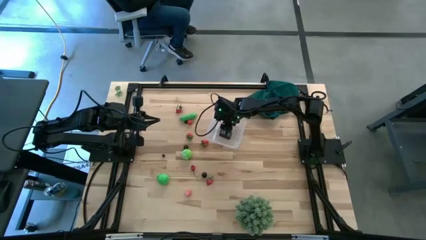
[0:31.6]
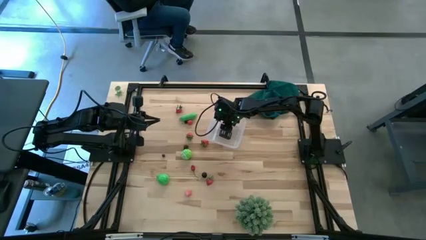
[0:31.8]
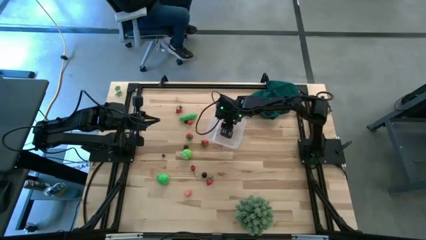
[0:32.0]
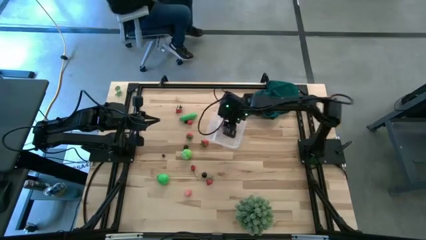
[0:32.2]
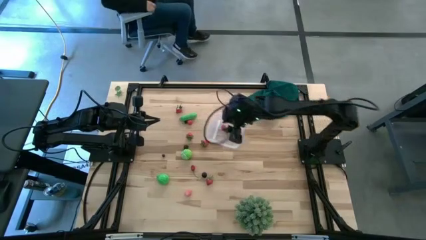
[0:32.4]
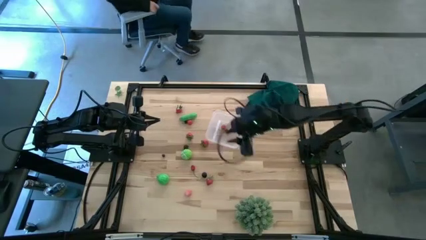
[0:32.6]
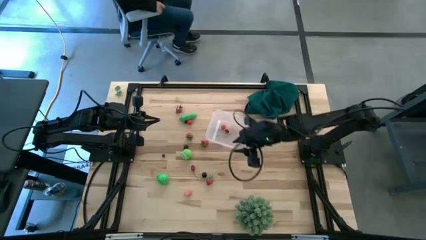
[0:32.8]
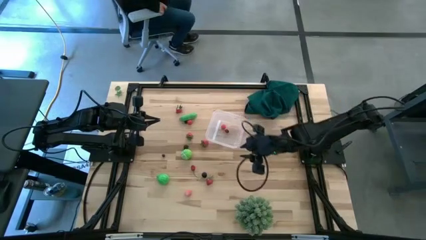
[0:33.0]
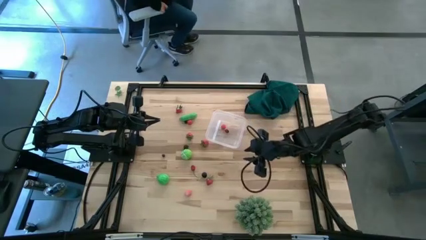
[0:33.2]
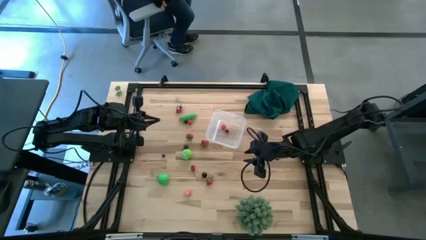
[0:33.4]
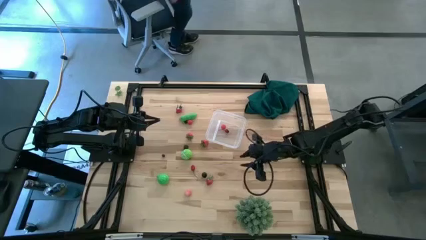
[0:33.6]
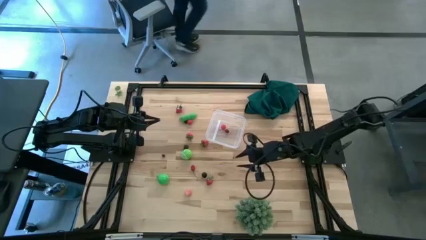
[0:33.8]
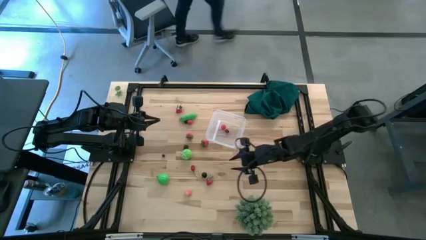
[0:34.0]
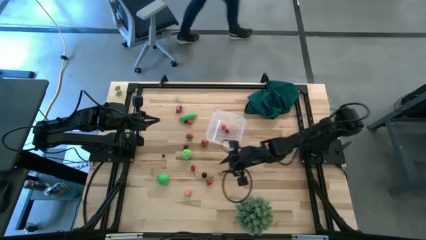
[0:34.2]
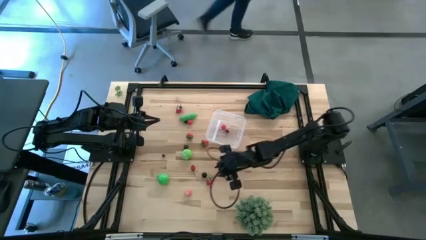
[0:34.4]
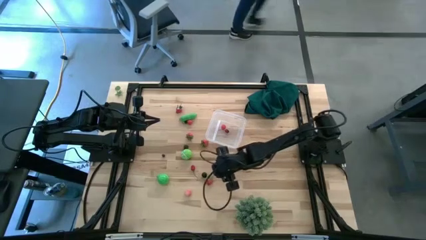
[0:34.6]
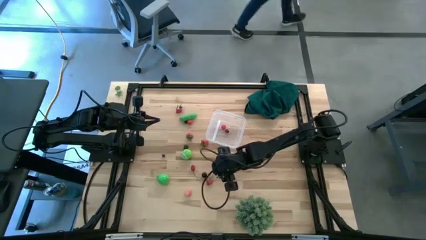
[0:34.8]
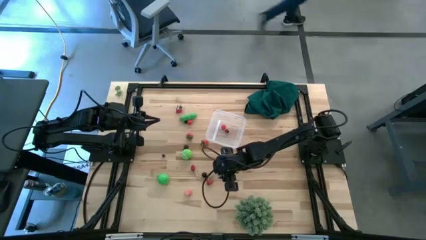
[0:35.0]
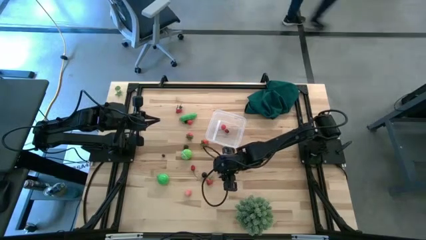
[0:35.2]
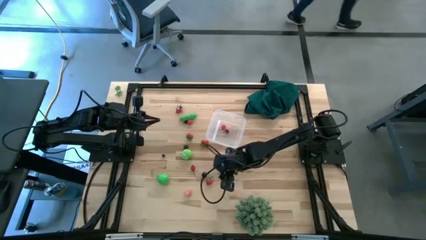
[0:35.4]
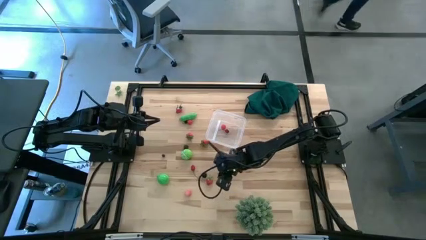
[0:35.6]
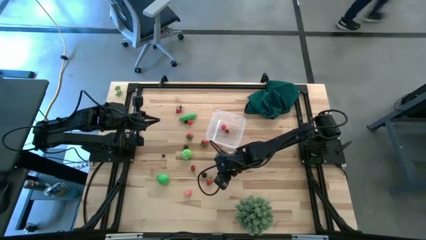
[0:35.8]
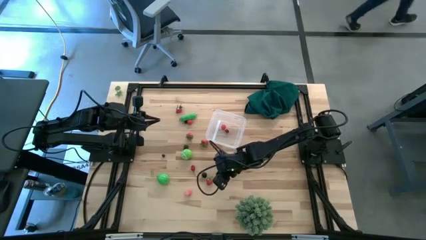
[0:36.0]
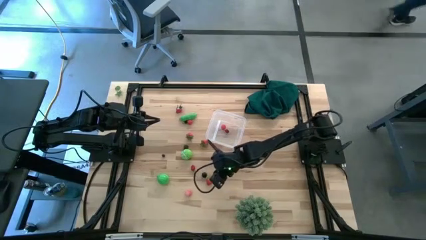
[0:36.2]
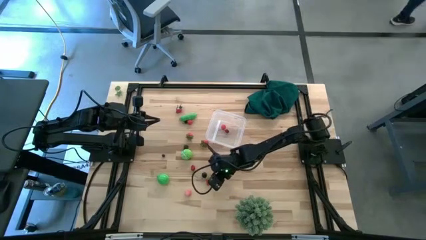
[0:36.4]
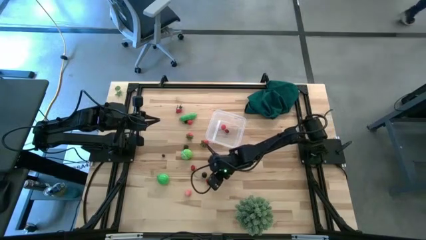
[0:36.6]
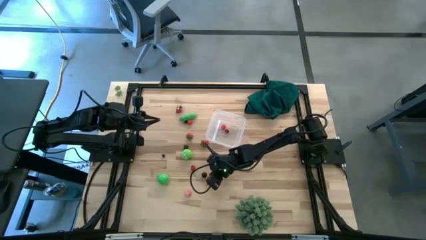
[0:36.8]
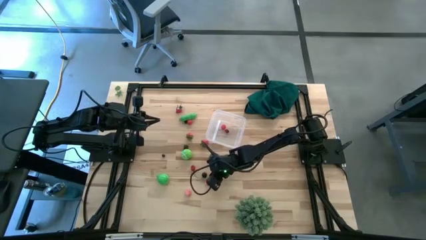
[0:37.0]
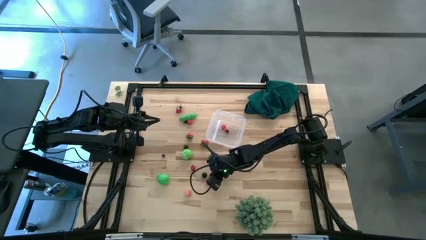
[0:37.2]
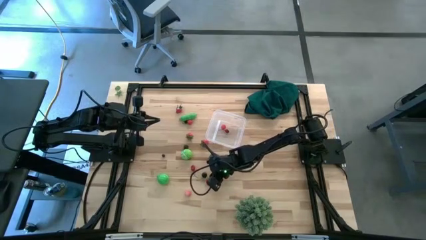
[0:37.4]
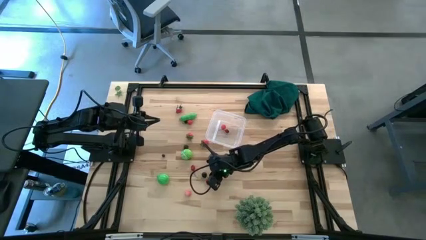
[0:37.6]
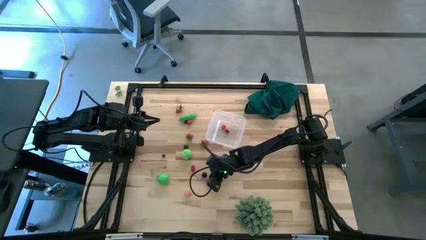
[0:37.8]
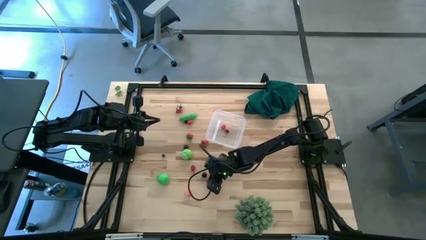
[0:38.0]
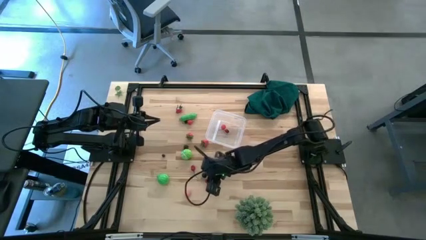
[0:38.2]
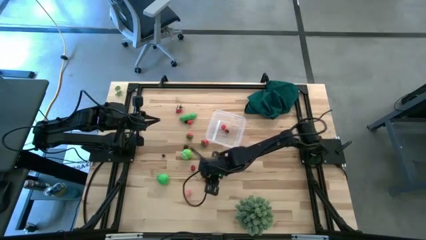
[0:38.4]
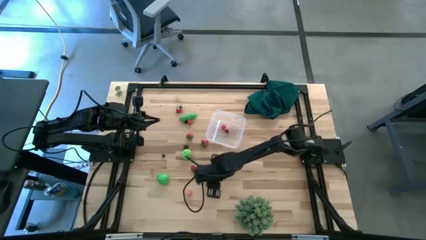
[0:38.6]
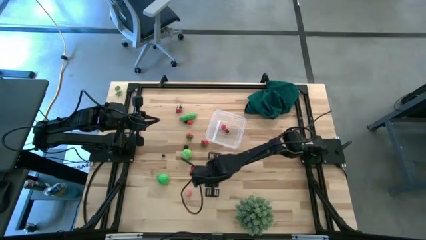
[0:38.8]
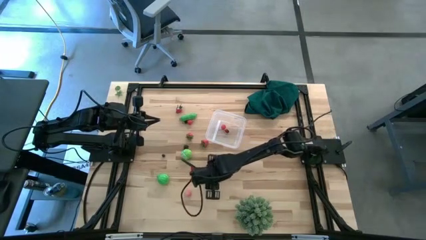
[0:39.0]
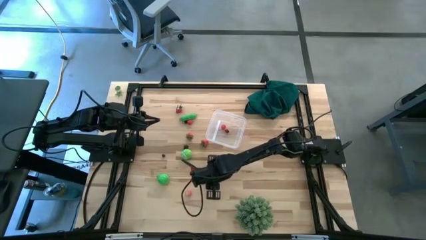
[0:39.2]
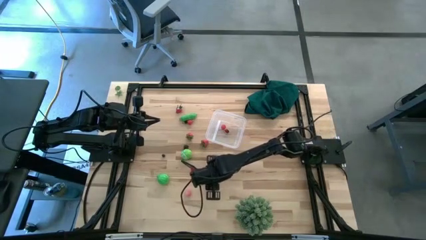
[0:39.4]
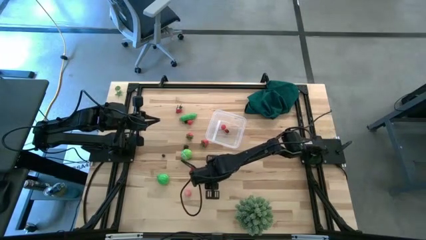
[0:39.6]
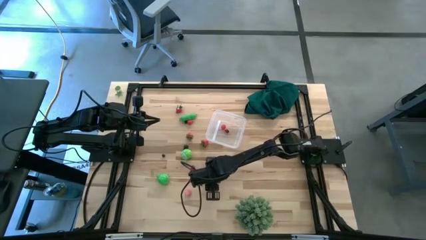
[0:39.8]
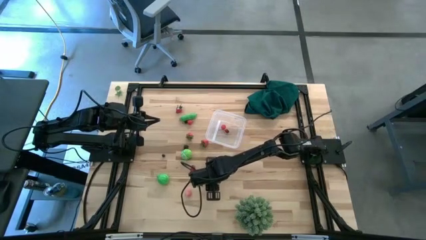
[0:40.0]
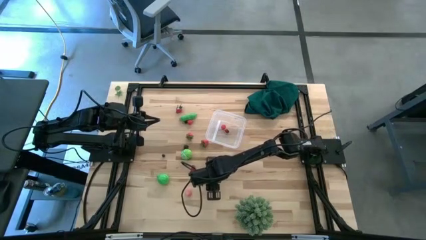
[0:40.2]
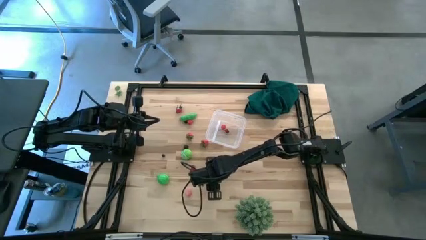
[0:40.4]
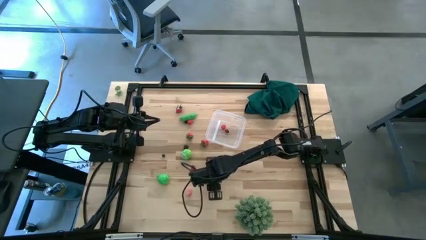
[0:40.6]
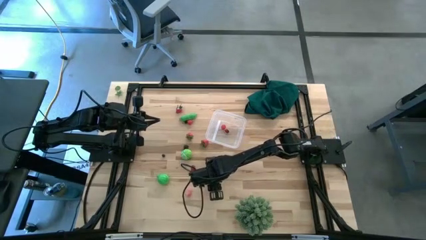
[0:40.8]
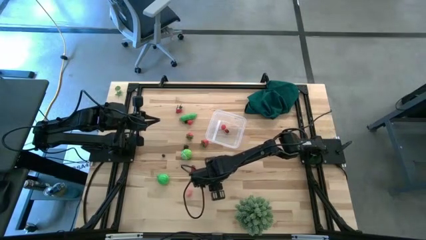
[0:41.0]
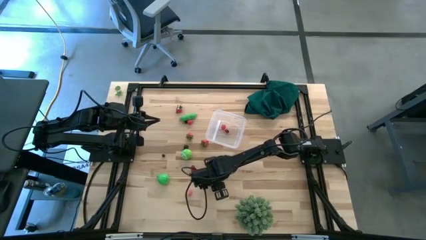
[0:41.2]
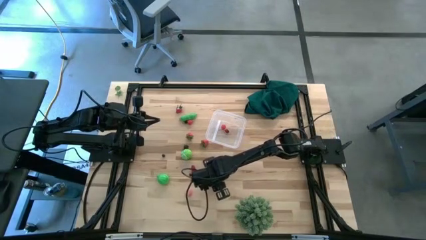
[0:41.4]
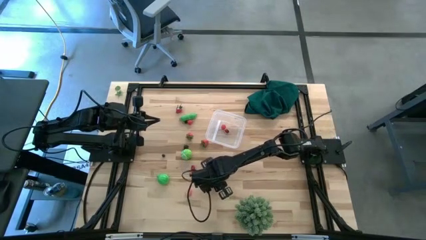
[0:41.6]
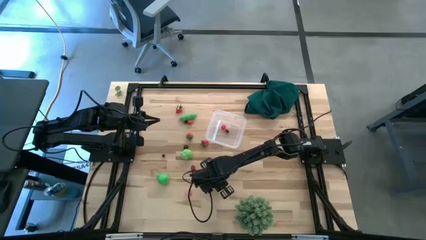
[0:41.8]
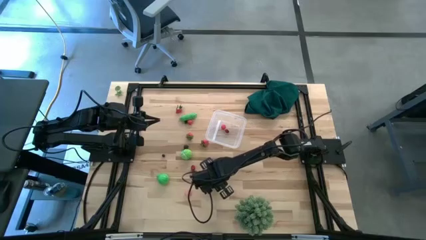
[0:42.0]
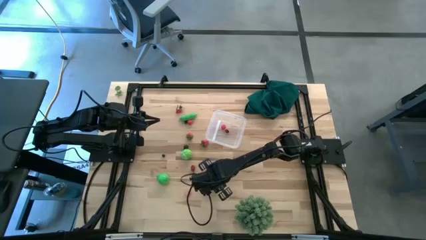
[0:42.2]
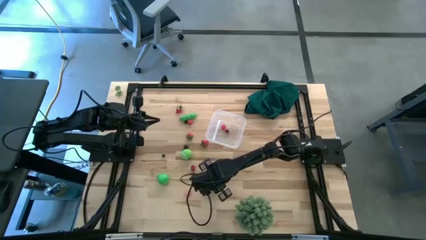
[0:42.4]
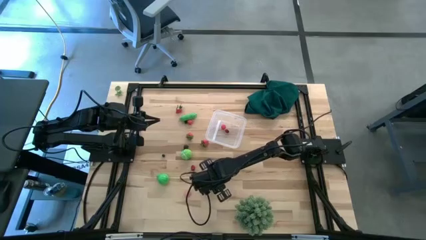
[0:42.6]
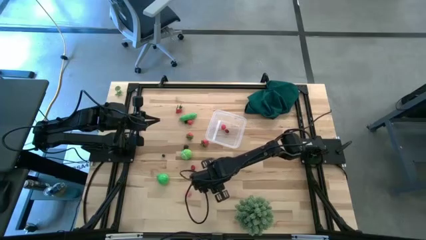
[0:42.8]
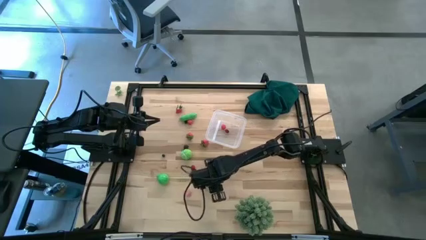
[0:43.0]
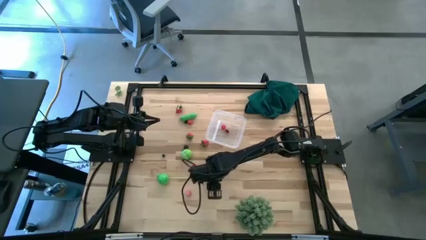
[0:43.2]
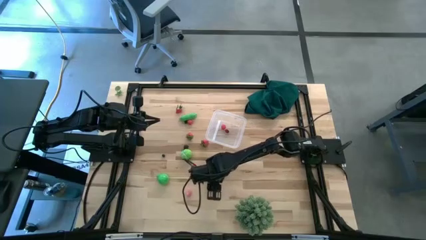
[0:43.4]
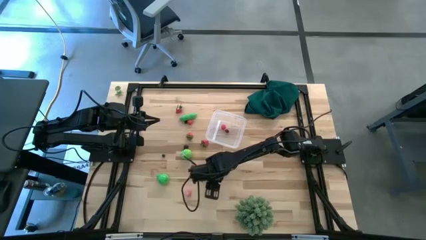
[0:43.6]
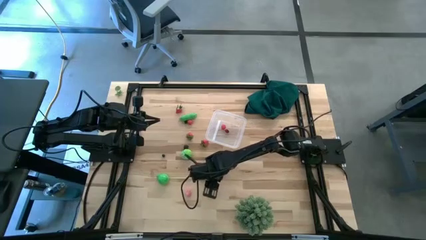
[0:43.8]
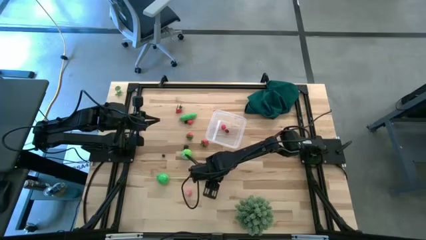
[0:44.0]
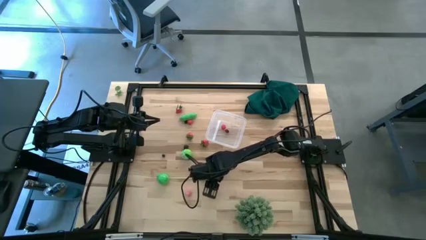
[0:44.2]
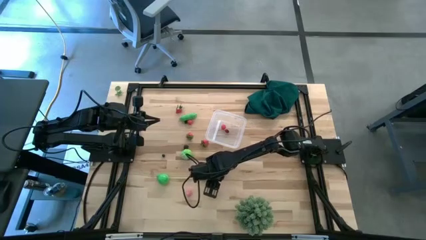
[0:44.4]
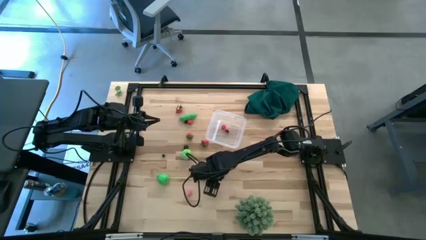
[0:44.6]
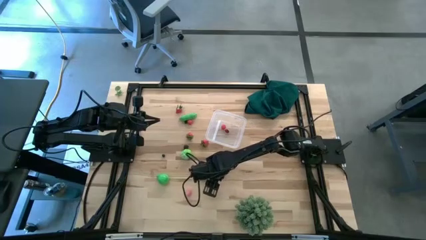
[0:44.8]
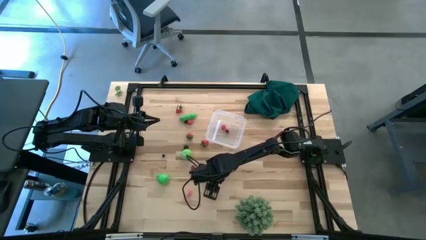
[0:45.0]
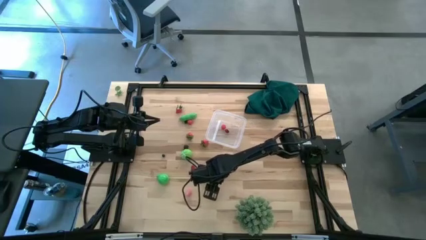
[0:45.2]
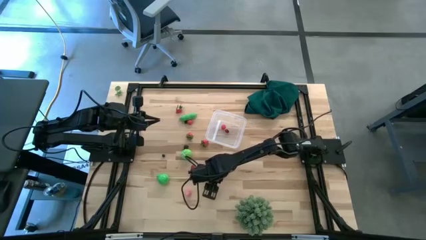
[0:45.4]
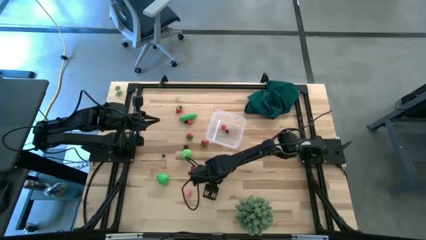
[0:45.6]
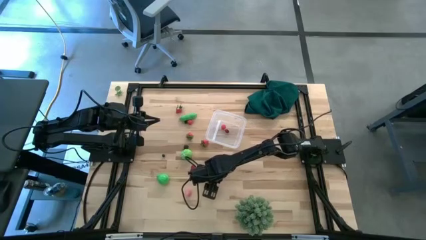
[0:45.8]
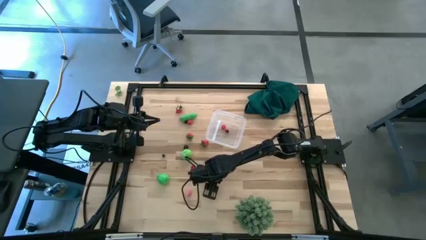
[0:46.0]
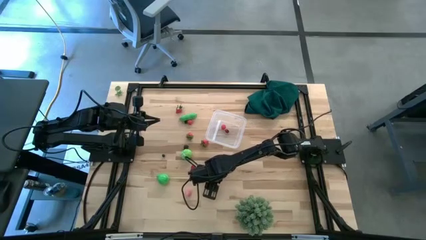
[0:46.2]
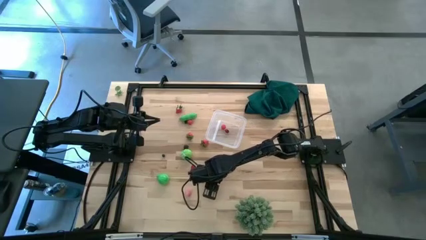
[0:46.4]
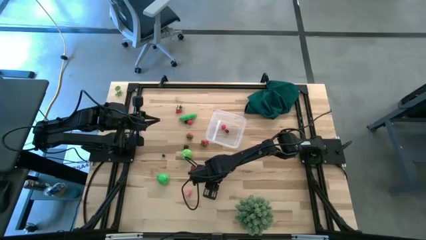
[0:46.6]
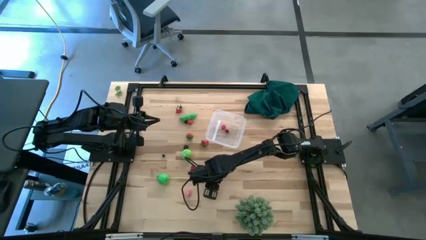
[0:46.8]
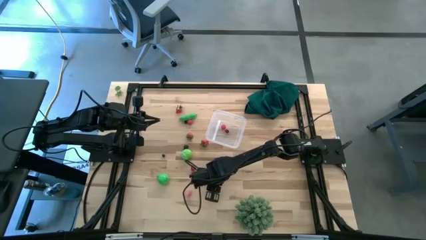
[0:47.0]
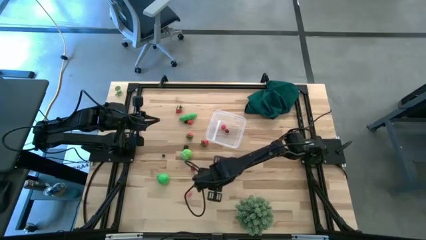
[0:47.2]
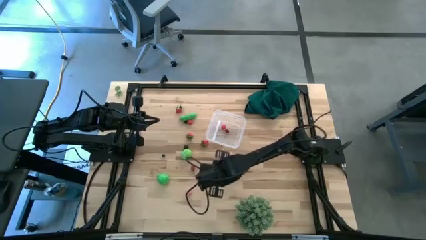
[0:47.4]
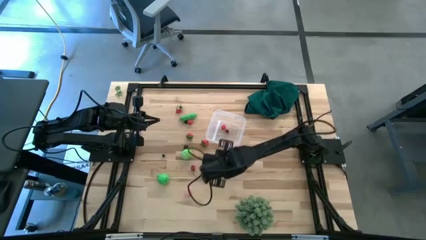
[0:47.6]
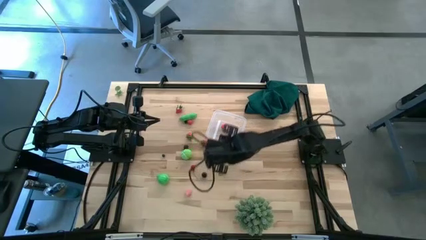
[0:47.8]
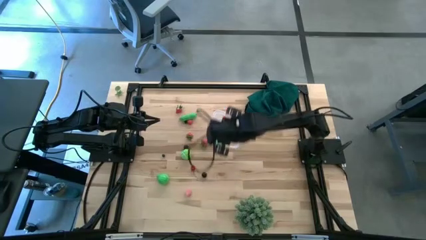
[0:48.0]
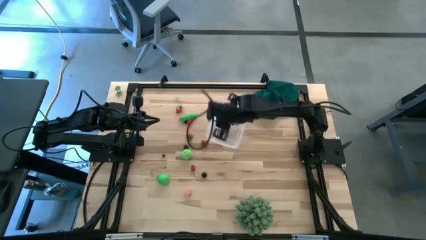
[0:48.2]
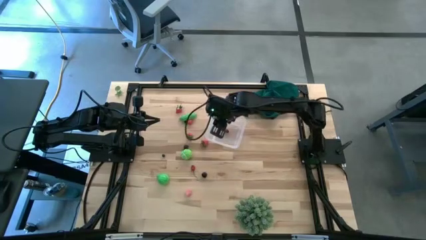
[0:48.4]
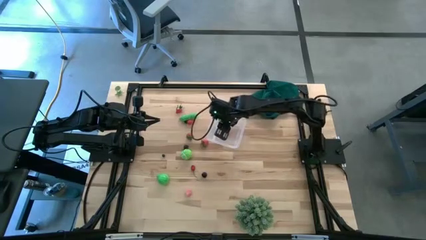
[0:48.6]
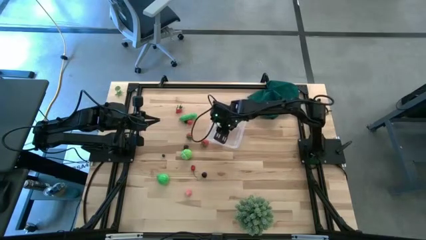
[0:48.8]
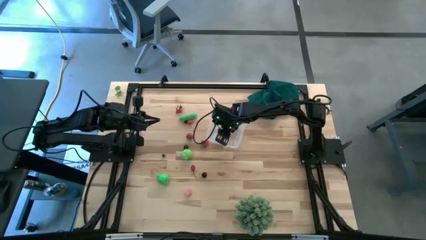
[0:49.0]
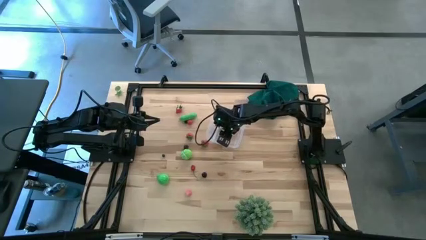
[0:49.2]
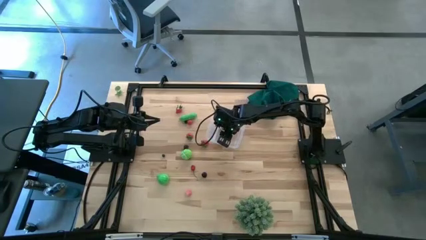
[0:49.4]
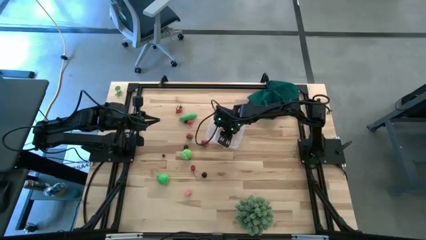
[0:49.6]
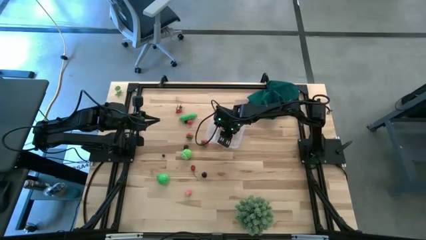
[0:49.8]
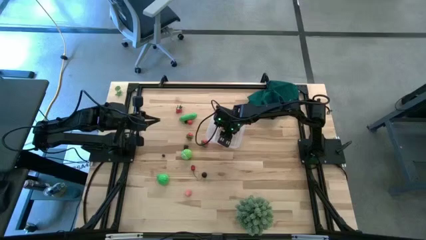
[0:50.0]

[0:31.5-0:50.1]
Task: Pick and placing Produce into tupperware
Put the red strawberry into the transparent bin
